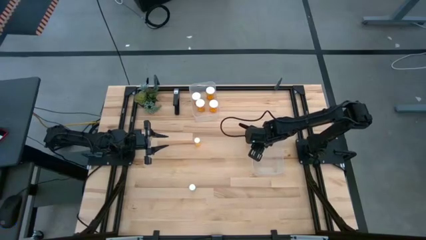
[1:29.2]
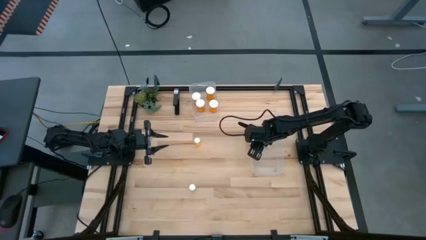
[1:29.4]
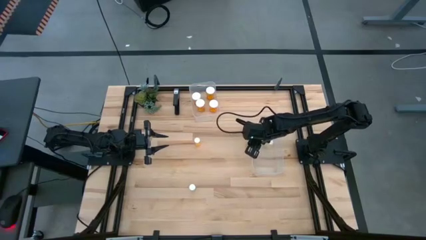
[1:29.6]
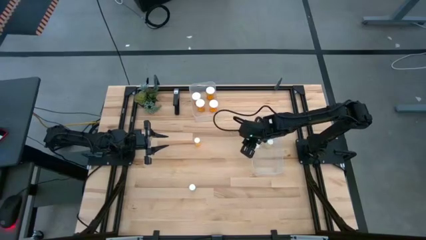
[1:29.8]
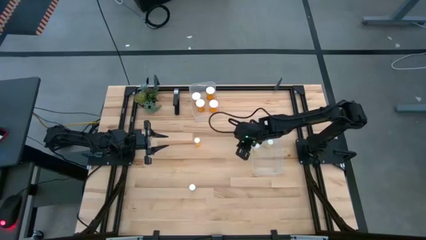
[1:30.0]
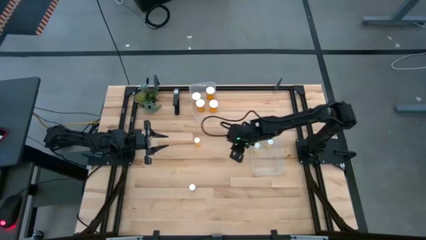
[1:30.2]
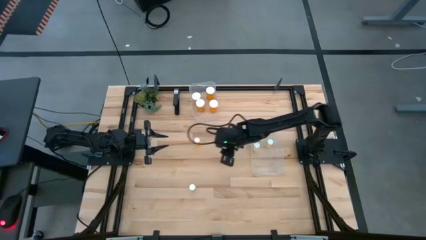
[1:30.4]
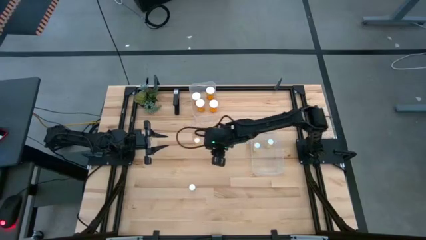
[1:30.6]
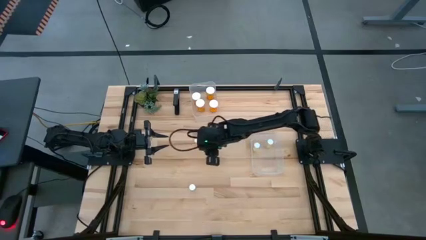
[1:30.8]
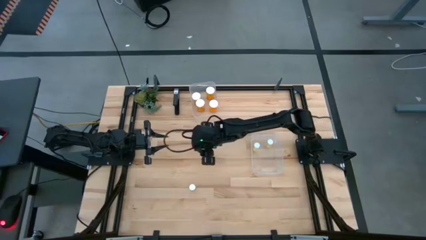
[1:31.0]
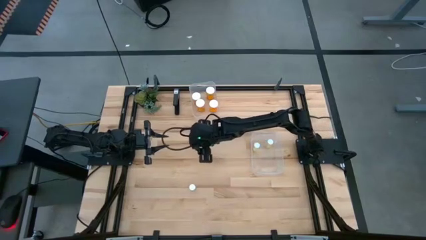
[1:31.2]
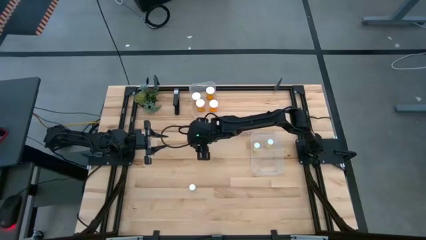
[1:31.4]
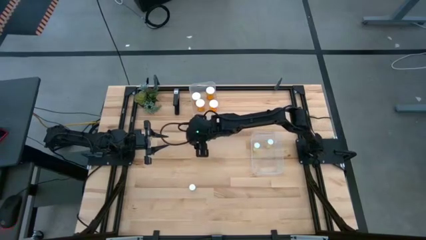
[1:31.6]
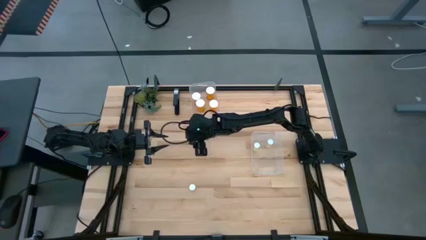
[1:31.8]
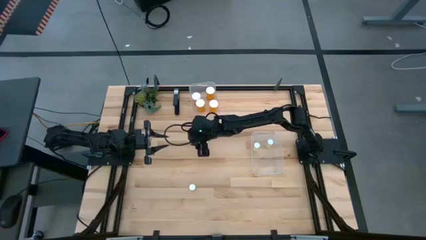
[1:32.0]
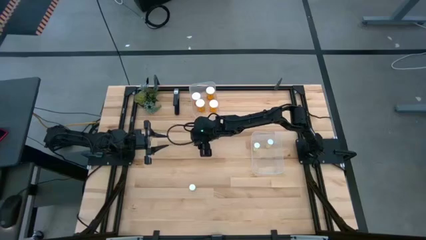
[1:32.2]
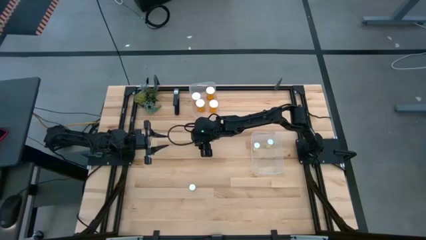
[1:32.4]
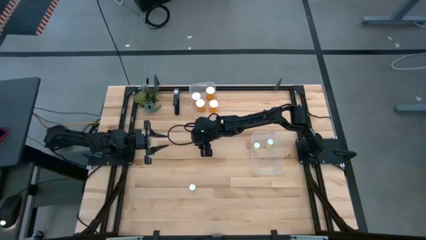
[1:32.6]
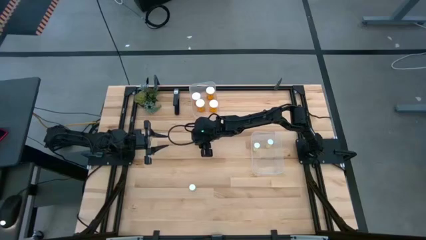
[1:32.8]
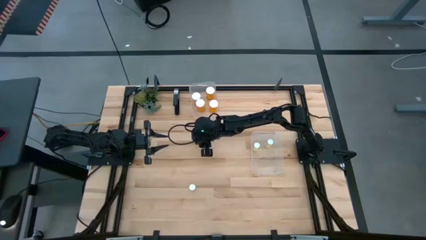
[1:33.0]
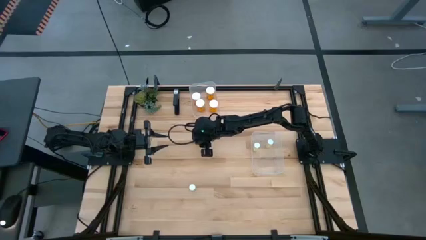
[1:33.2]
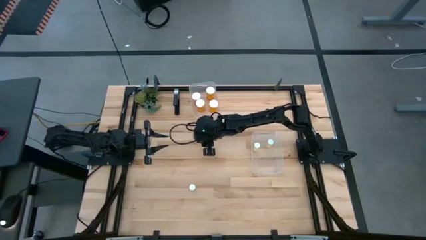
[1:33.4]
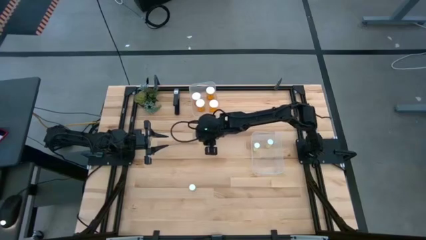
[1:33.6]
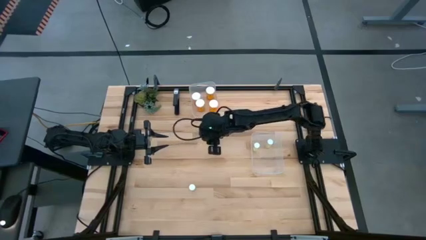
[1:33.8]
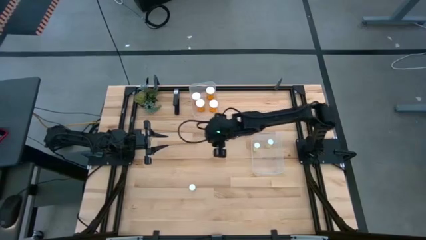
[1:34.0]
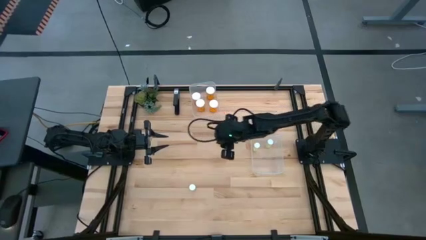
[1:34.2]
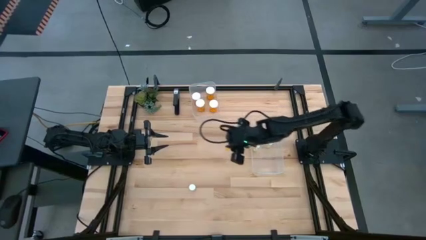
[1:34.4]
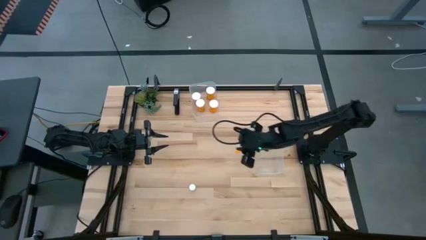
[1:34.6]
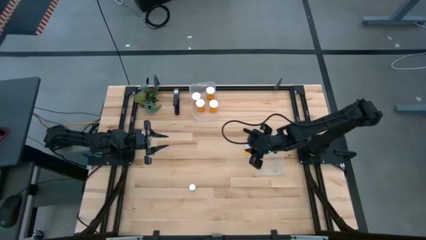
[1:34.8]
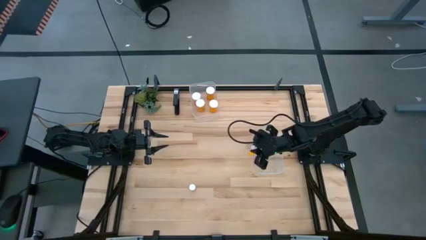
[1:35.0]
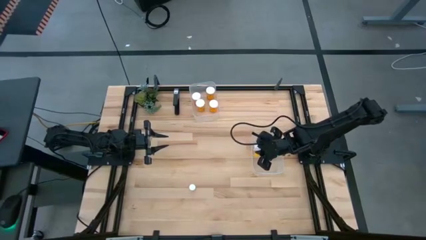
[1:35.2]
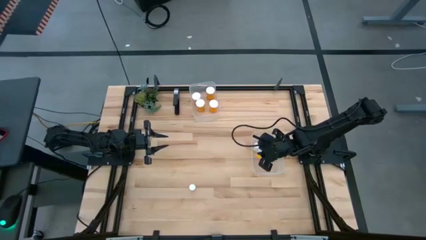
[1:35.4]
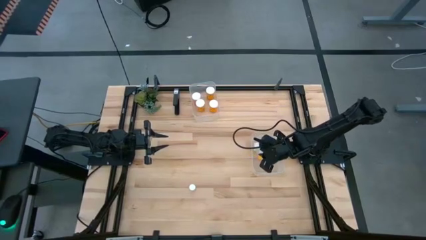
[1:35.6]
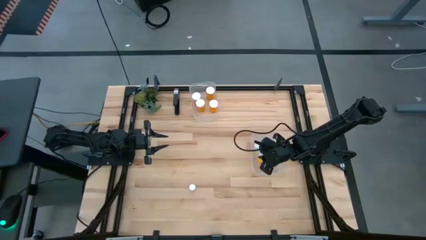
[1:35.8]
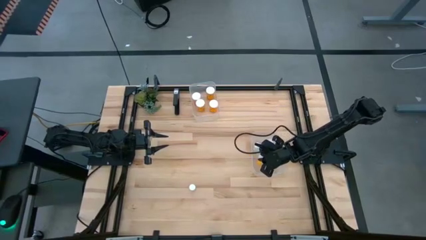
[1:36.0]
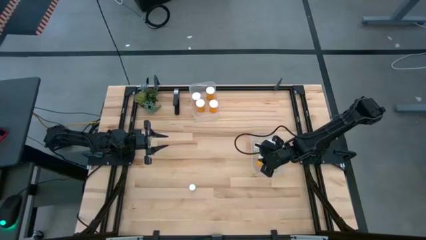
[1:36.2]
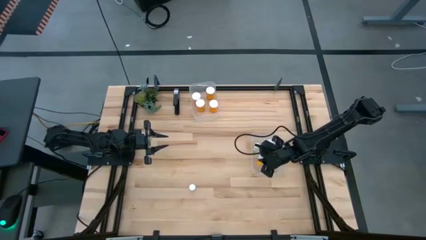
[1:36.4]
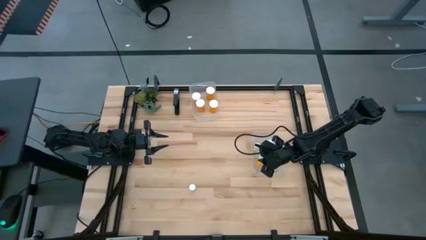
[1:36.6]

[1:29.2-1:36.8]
Task: Pick and place medicine bottles into bin by pill shape (circle, oval)
Put the orange tablet bottle into the bottom transparent bin

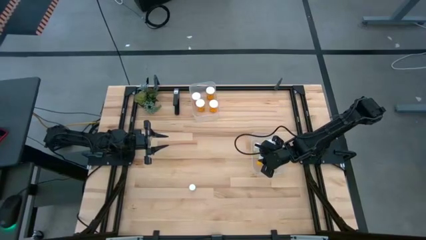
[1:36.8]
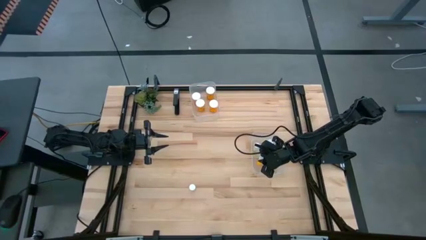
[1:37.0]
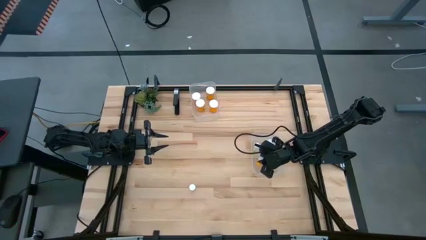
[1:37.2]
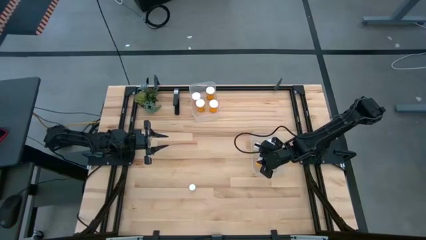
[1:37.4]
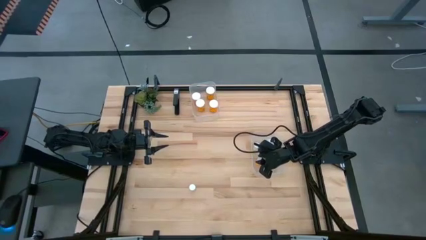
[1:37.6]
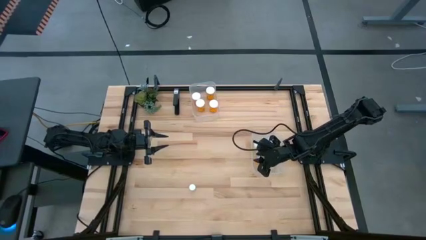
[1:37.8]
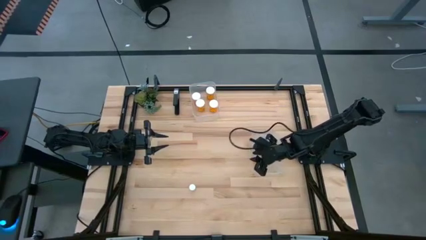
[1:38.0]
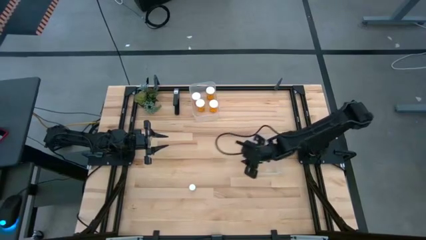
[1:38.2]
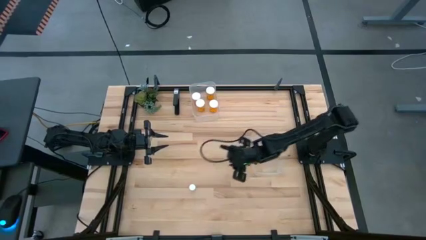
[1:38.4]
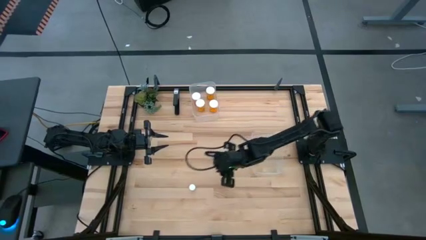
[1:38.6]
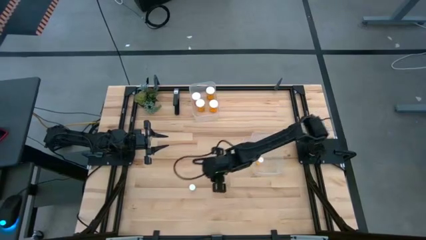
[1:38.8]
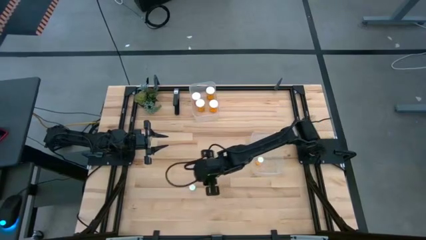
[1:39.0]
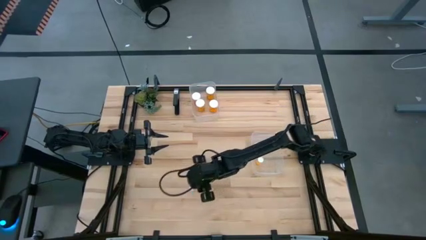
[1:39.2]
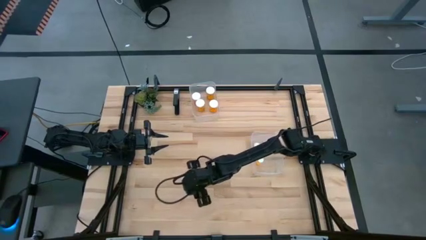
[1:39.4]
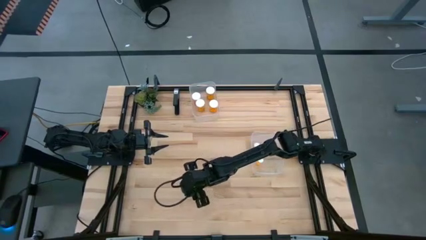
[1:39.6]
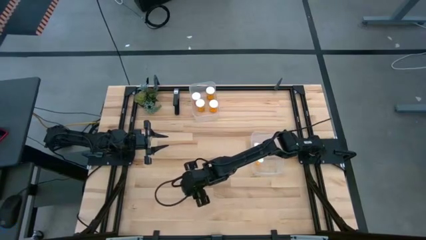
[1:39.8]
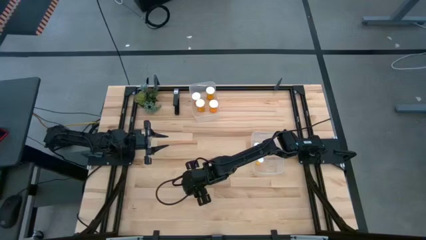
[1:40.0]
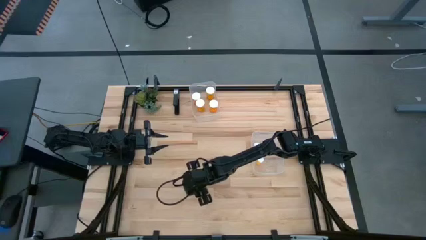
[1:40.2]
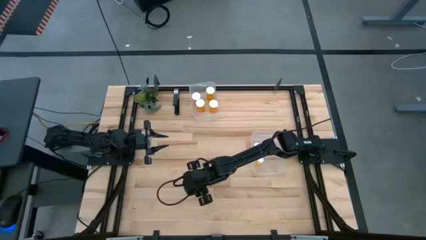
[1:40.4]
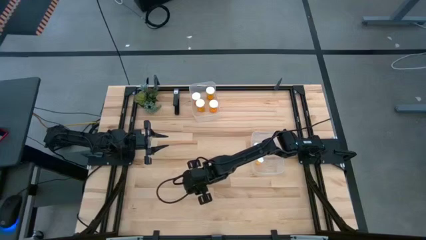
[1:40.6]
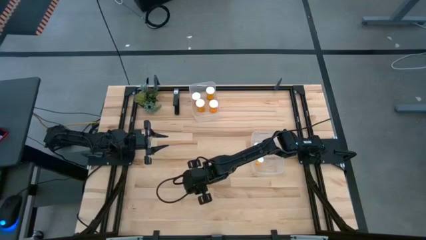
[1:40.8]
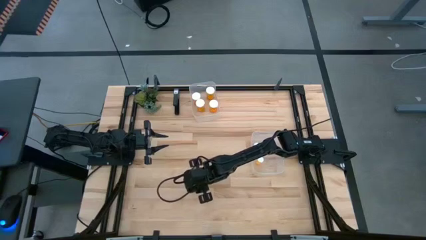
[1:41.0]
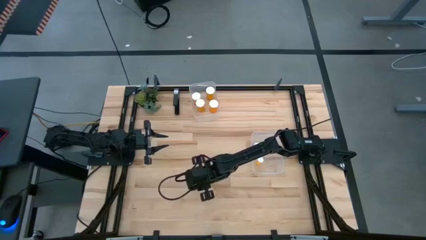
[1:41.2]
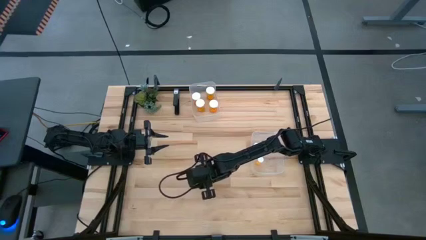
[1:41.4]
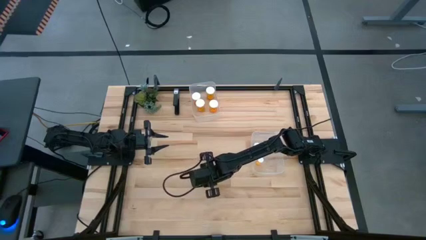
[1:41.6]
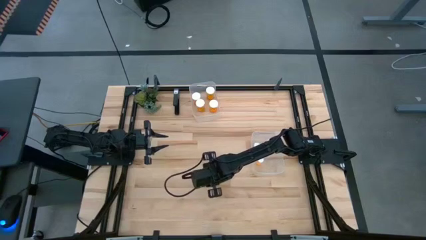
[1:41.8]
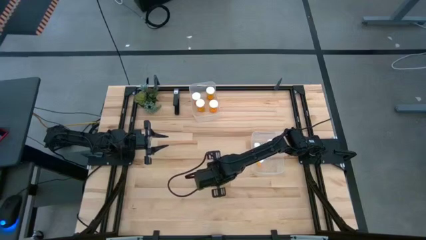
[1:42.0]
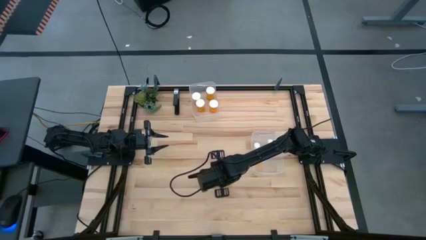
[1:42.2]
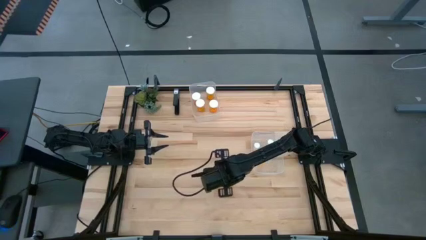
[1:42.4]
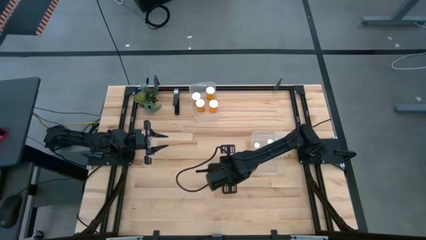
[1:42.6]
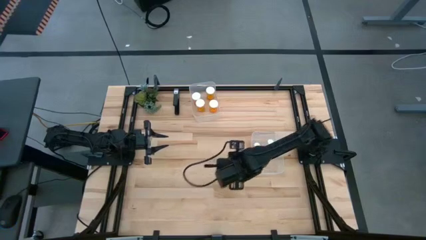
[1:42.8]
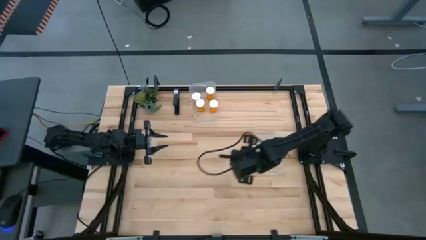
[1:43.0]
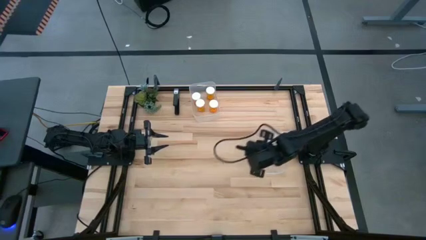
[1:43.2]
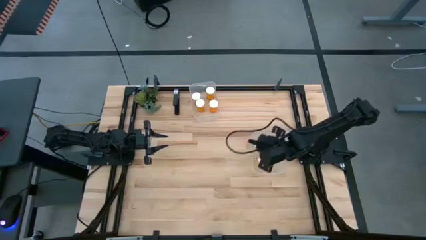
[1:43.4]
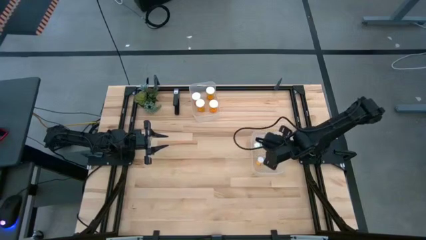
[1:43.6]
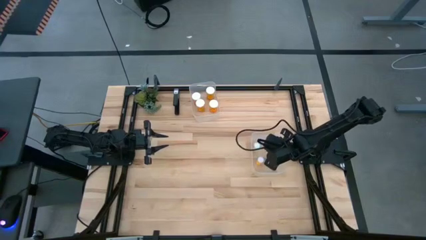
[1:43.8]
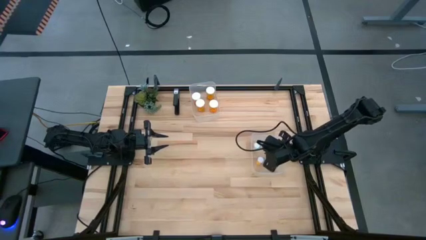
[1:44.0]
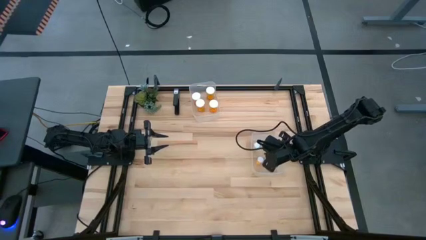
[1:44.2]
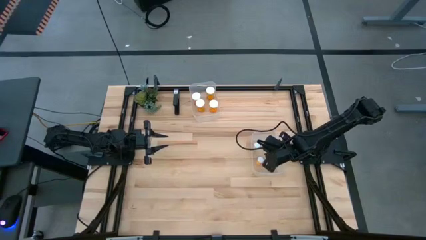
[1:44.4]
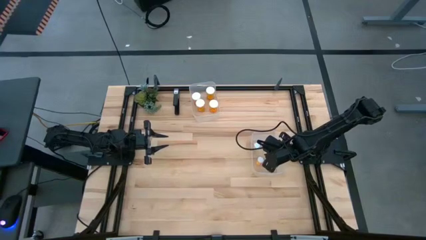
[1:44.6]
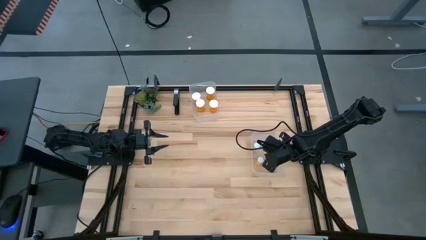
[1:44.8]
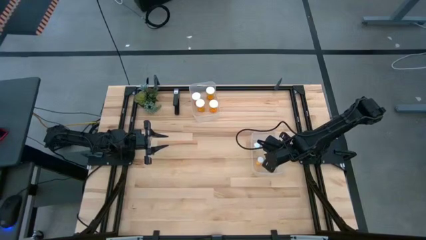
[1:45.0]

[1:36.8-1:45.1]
Put the yellow tablet bottle into the bottom transparent bin
